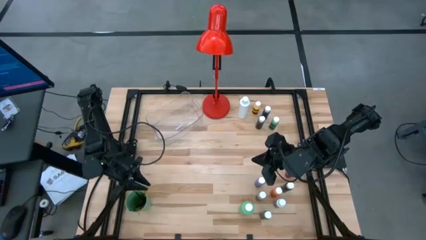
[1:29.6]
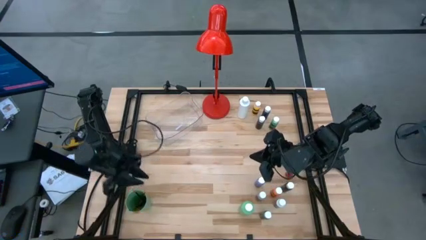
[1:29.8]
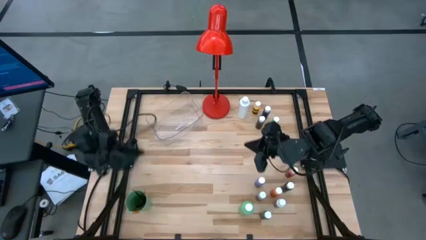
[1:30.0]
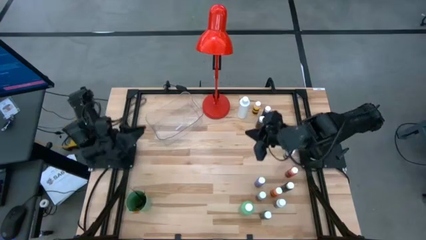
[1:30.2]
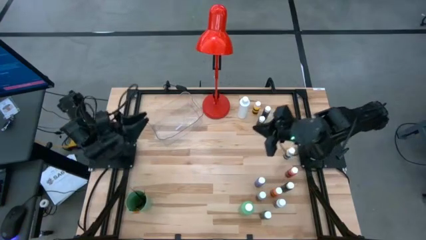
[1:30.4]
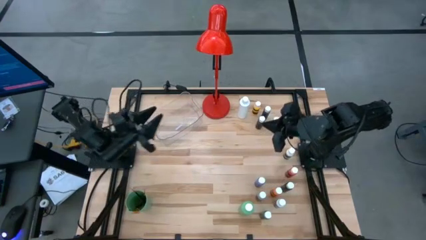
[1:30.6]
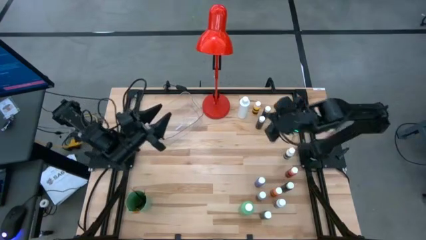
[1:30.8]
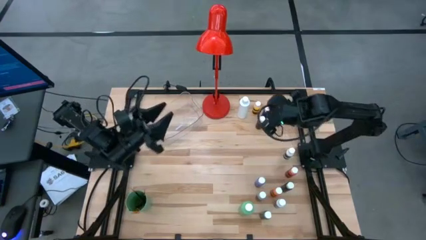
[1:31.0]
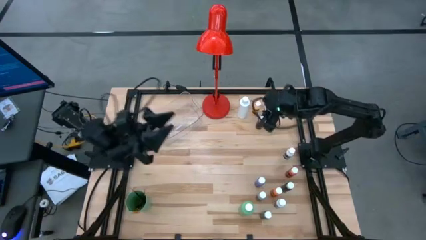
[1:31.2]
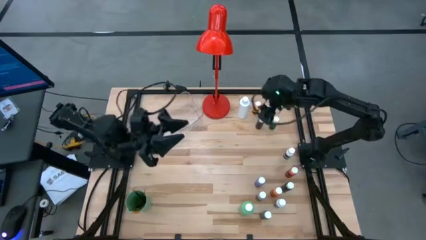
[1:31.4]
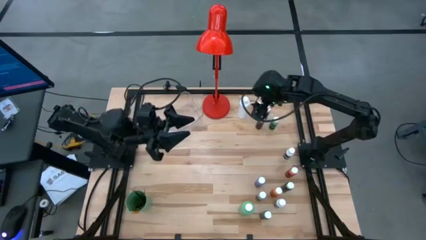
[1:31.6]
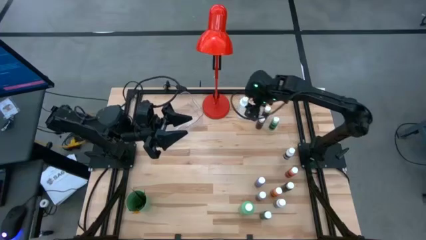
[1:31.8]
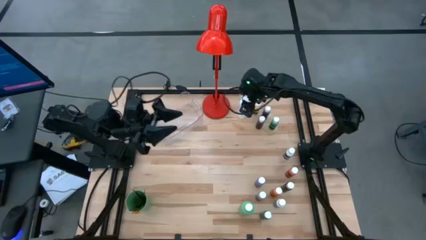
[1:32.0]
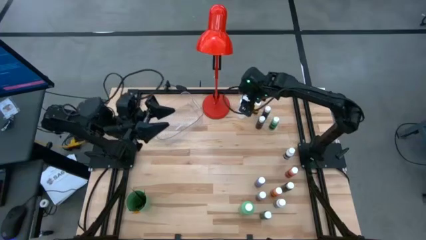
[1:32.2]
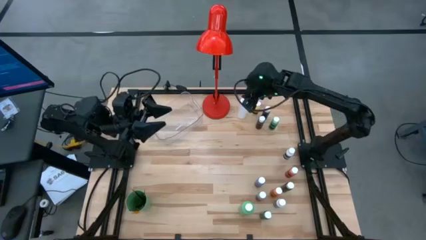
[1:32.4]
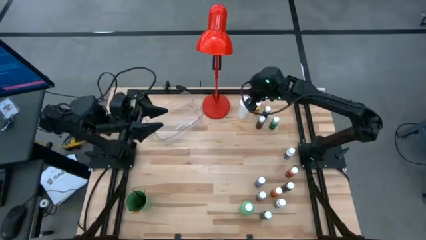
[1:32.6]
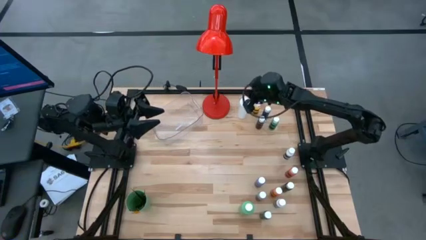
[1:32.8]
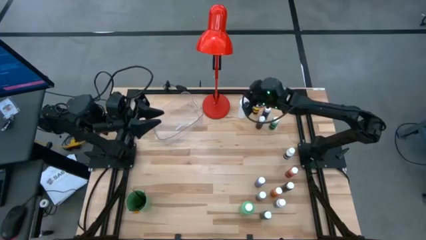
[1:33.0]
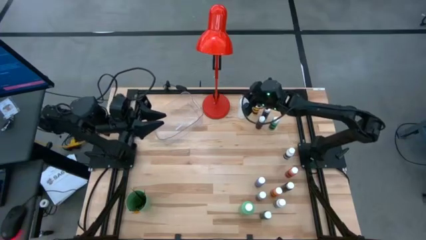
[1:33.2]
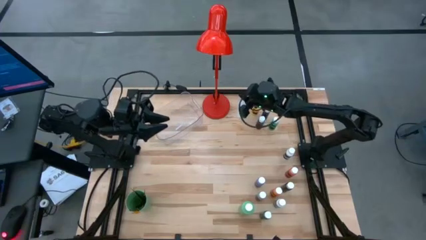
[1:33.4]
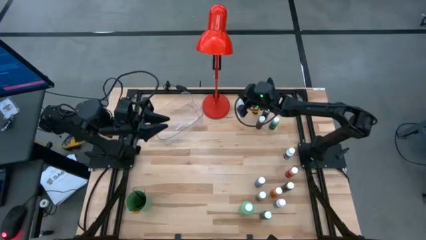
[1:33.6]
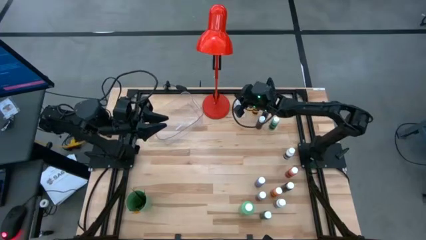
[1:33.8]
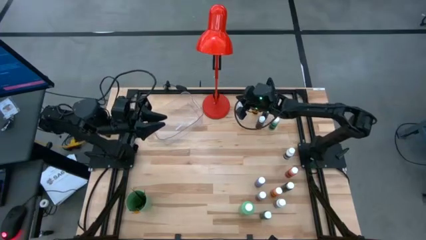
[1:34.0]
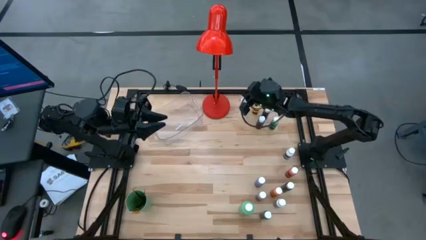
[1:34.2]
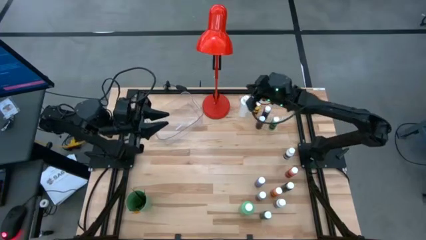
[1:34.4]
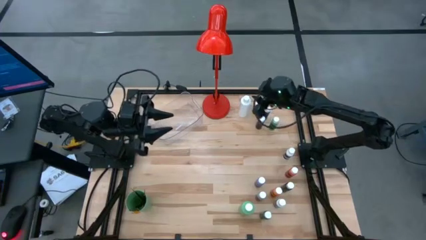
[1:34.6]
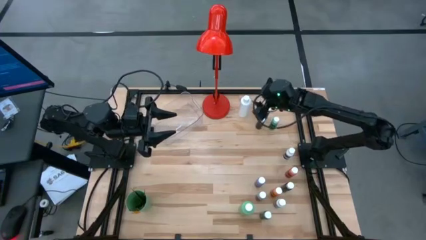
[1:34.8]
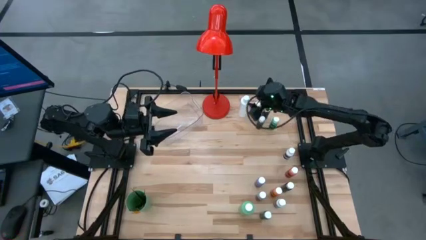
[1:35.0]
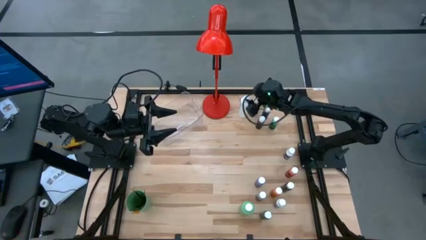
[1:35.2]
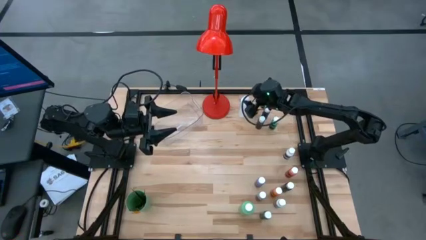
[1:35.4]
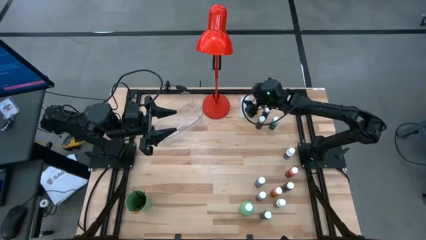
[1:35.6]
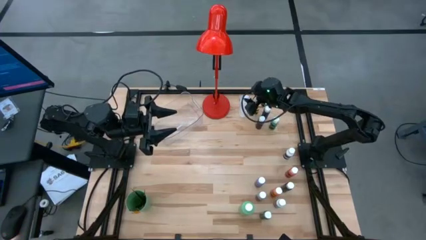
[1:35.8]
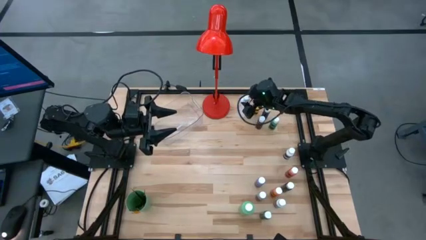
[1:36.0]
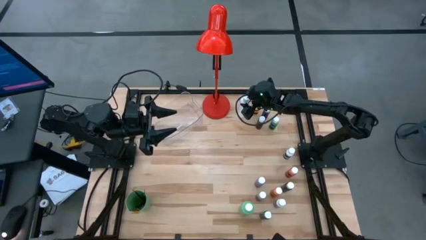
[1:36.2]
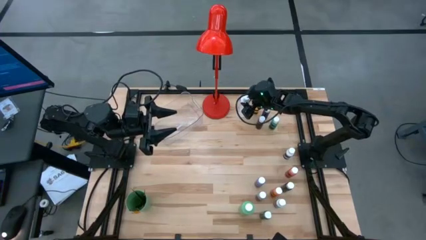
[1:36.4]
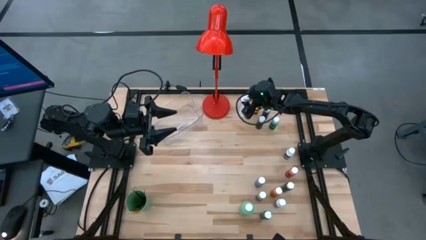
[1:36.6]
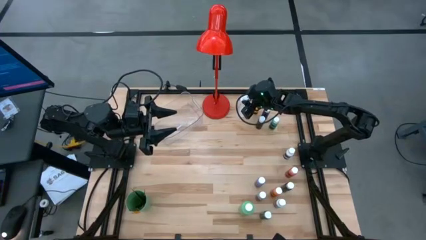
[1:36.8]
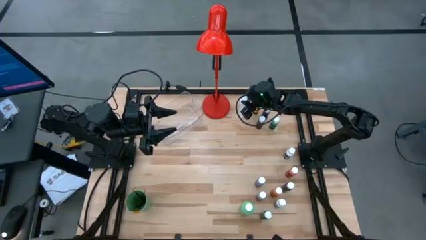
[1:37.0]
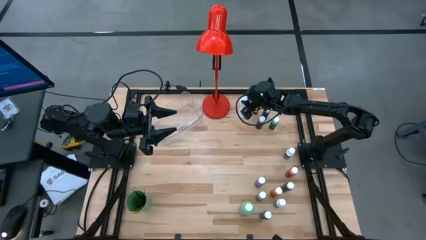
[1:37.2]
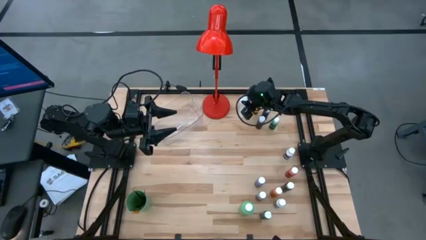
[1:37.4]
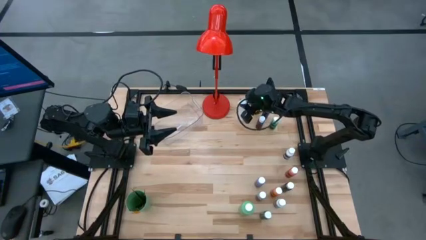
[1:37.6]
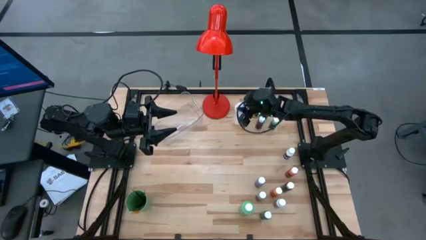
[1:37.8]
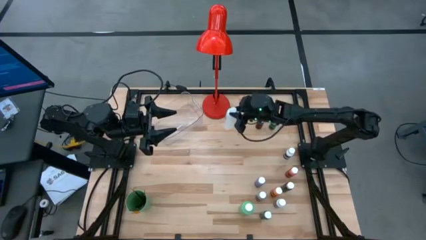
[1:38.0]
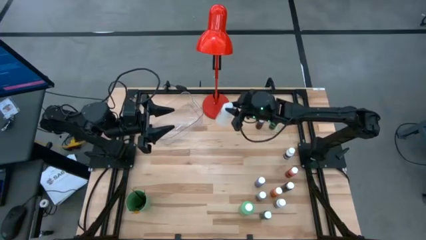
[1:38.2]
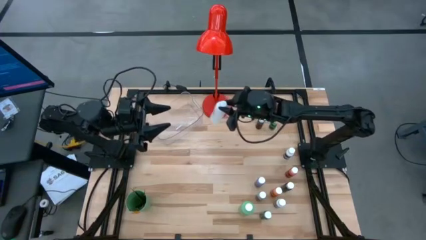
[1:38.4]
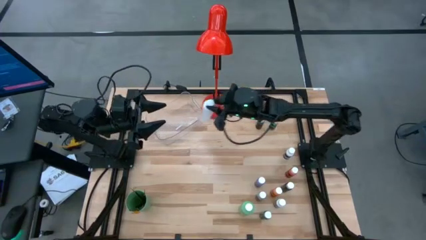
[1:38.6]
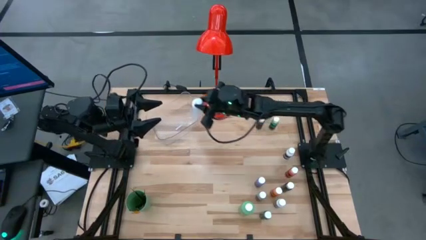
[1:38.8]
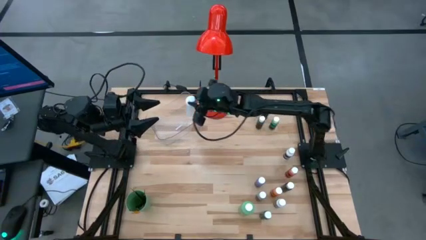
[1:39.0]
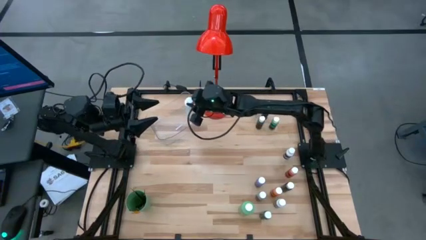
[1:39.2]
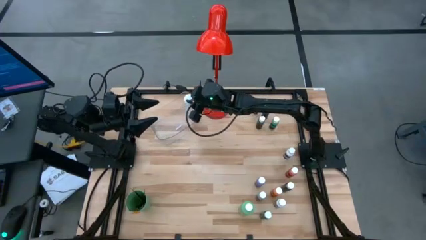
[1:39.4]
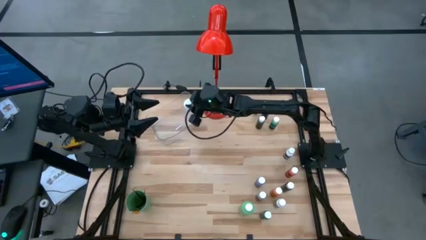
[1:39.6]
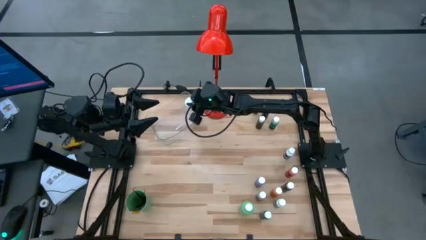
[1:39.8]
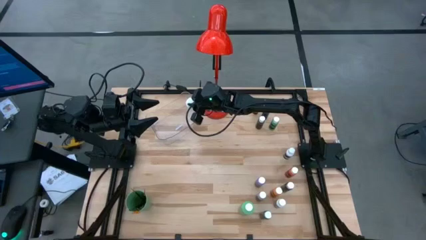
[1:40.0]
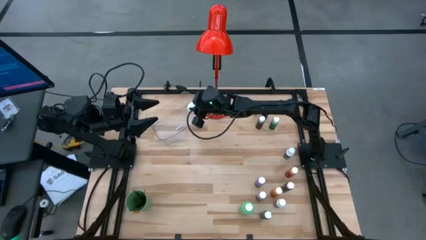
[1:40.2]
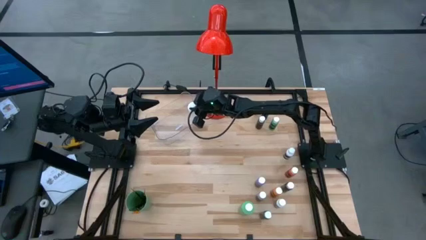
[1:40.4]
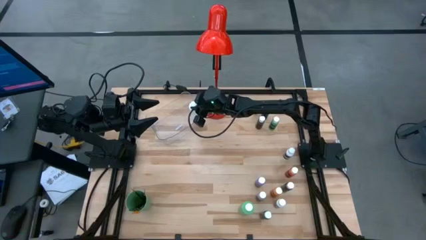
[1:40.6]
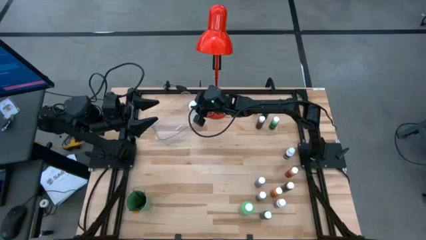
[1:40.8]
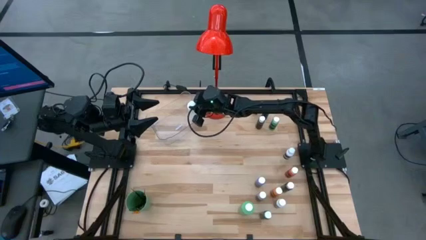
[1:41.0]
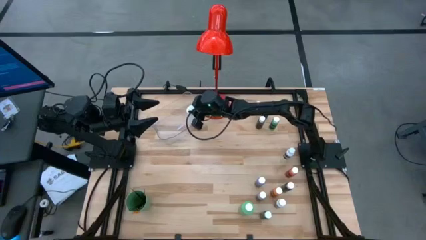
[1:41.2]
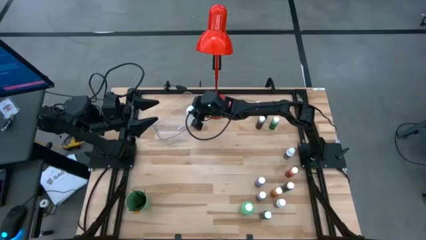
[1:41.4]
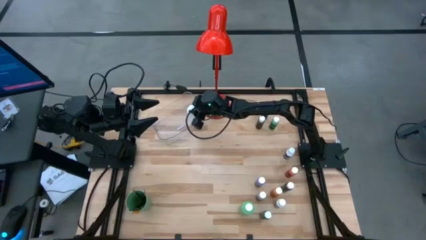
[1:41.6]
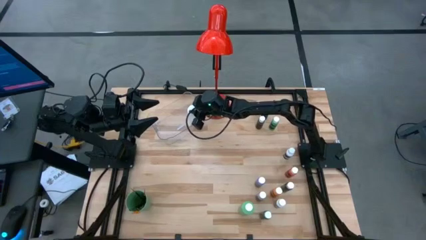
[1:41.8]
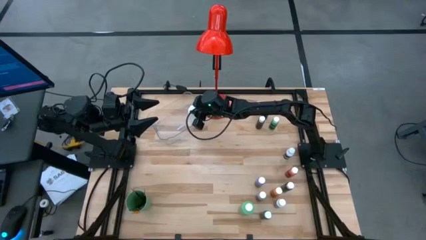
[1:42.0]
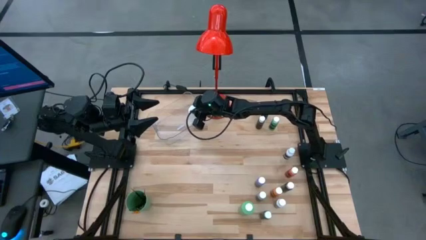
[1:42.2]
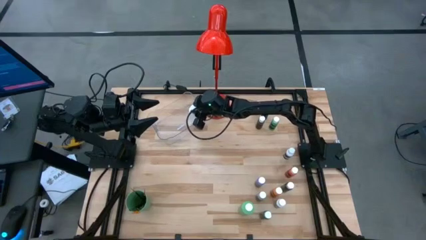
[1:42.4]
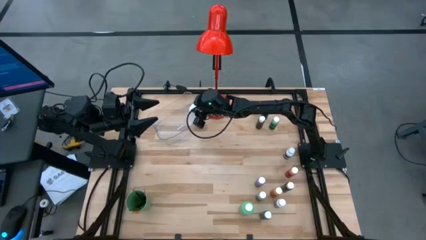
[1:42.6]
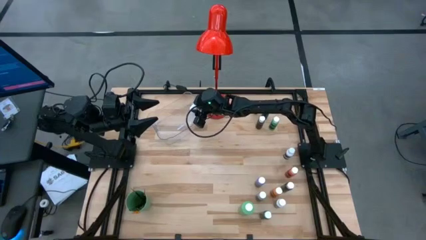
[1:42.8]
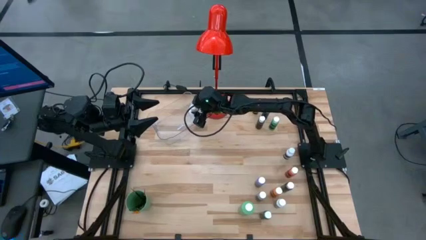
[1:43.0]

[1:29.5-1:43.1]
Task: Pick & Place Paint Supplies
Put the white paint bottle into the transparent bin
